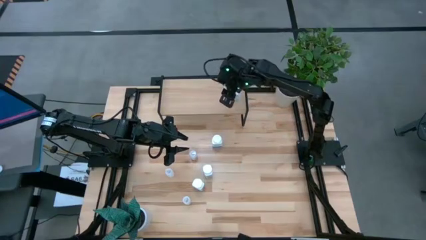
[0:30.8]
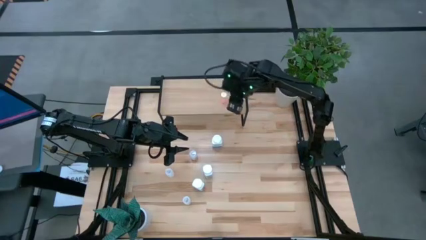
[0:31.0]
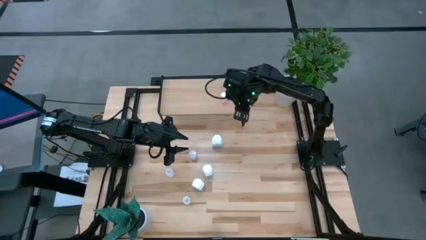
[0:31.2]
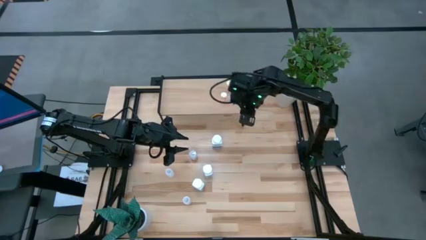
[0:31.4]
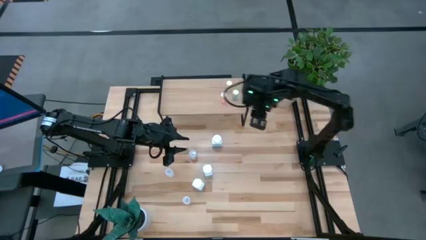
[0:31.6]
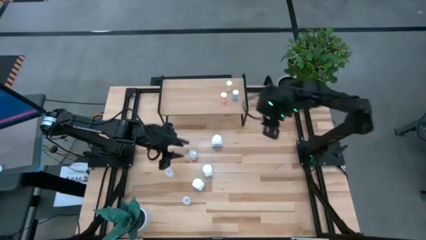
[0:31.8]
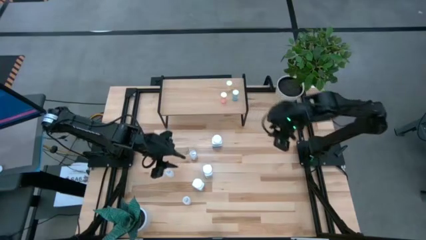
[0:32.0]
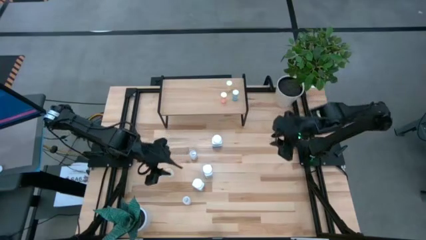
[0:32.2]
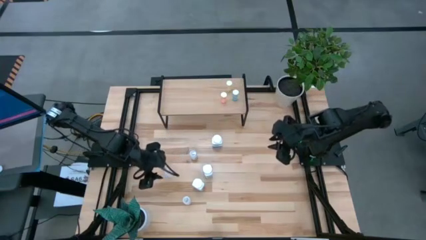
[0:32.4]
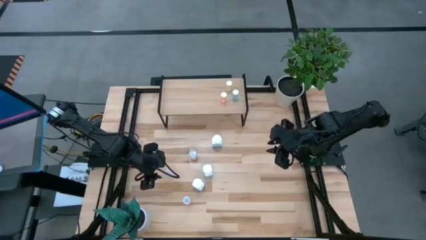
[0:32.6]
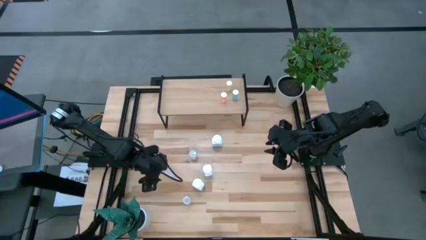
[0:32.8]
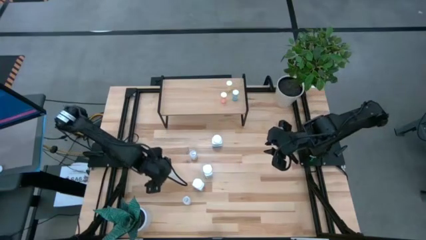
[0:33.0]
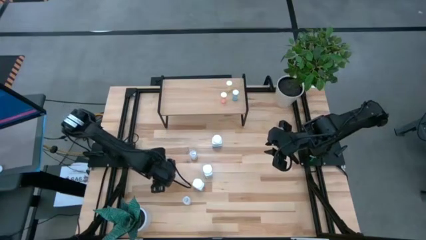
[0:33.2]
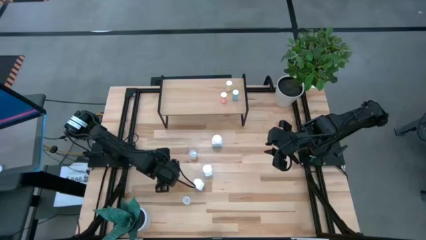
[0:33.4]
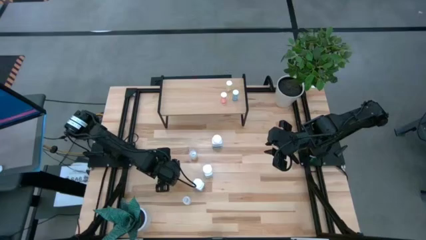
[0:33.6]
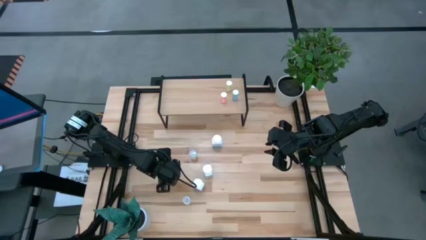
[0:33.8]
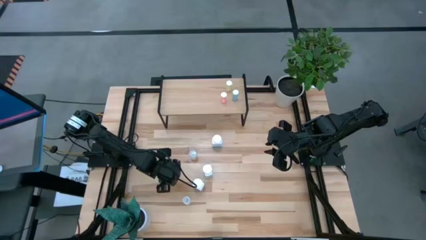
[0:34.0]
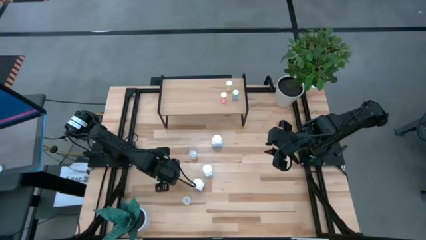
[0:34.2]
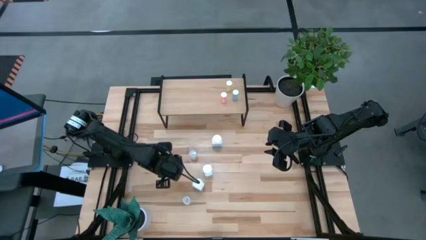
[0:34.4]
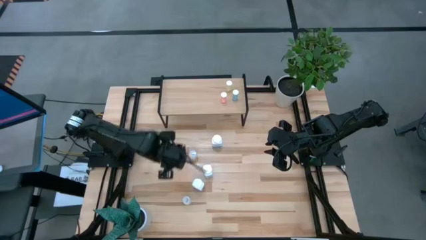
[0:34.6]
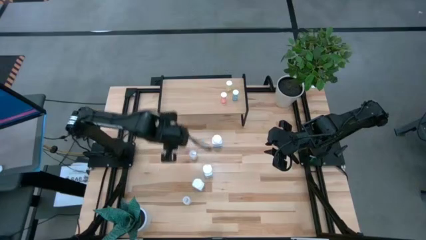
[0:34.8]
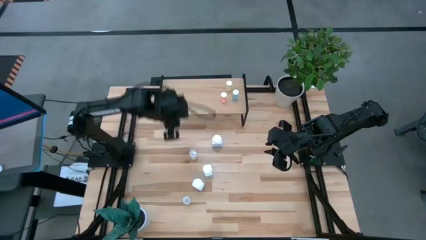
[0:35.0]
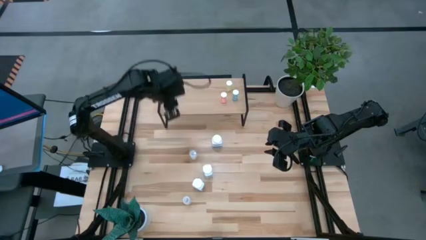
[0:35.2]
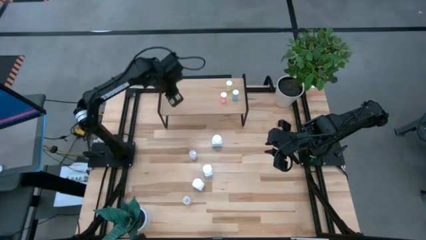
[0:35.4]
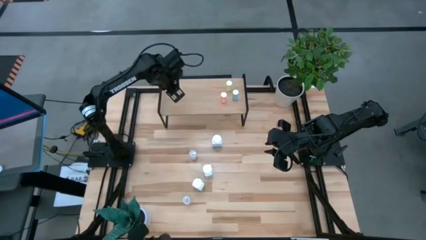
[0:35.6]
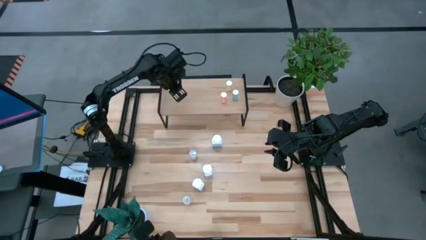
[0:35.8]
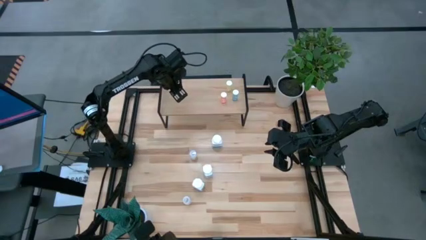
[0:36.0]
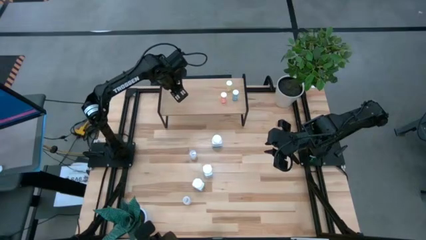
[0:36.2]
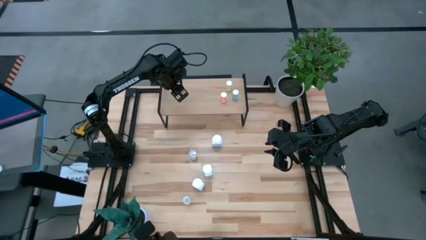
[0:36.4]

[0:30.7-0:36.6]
Task: Pick and place medicine bottles onto shelf by color
Put the middle transparent pill bottle on the shelf

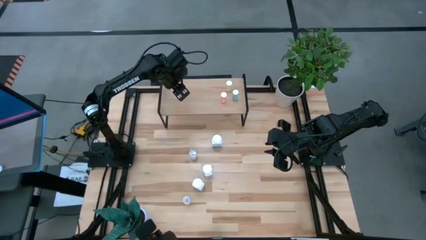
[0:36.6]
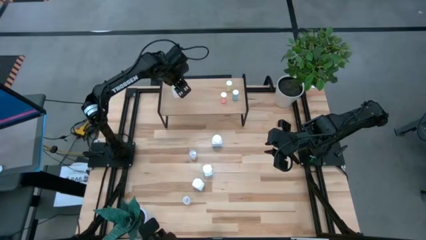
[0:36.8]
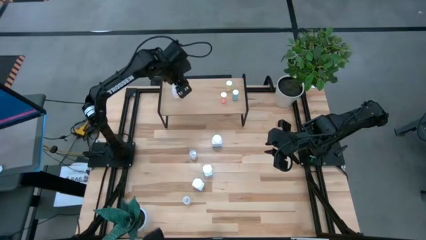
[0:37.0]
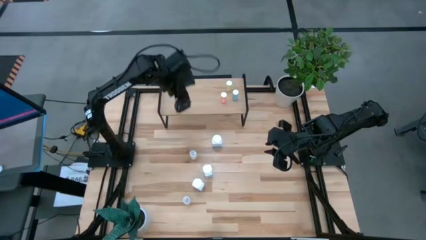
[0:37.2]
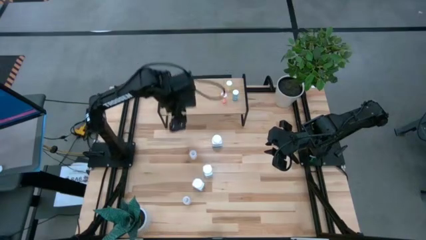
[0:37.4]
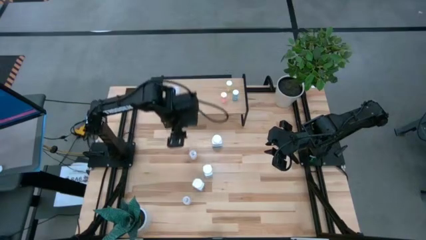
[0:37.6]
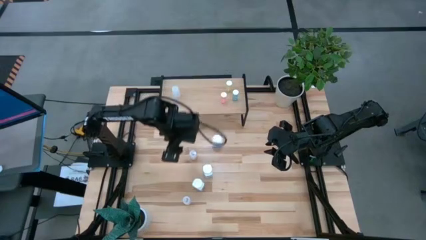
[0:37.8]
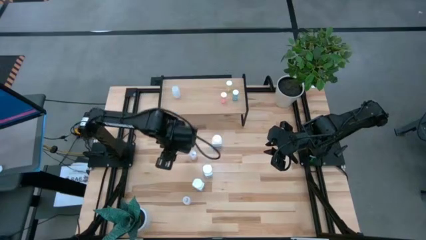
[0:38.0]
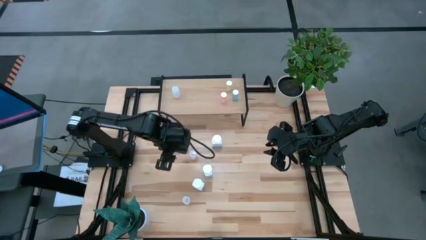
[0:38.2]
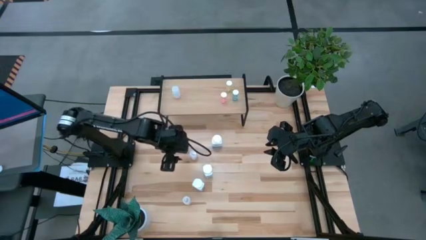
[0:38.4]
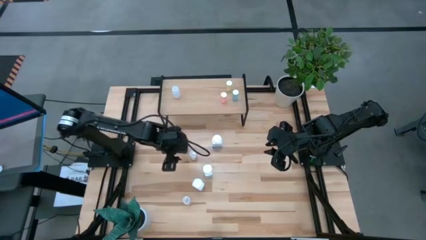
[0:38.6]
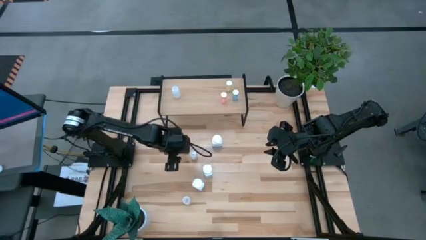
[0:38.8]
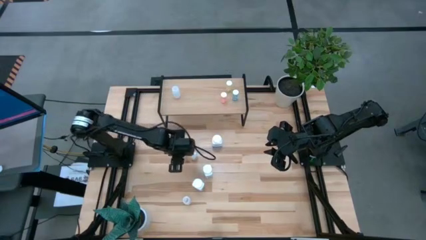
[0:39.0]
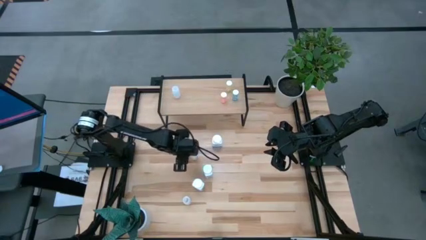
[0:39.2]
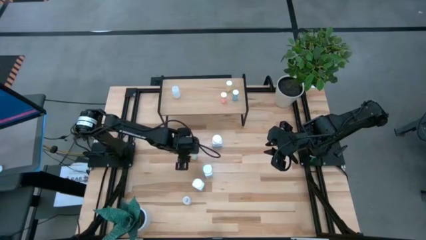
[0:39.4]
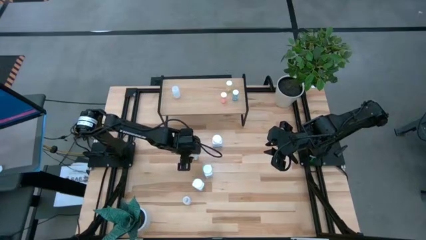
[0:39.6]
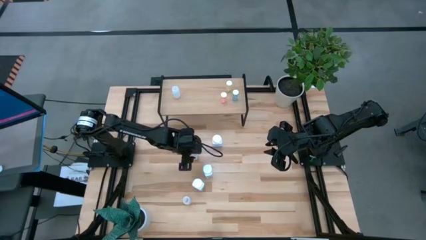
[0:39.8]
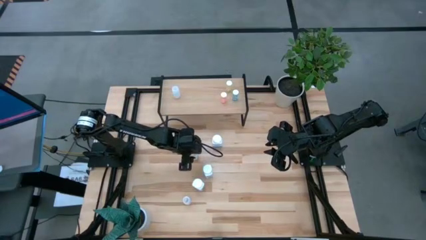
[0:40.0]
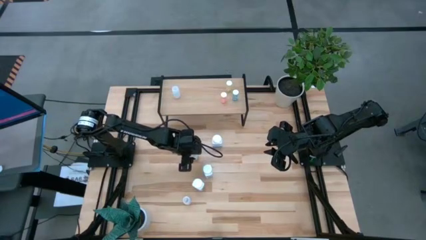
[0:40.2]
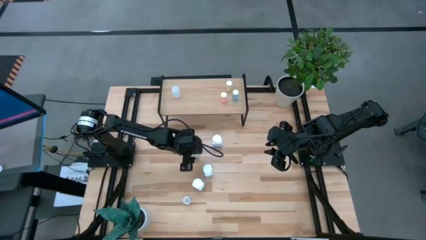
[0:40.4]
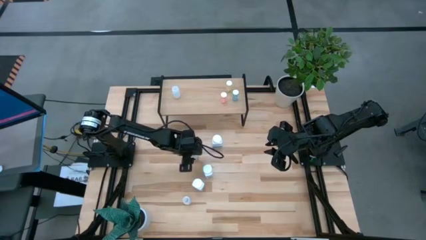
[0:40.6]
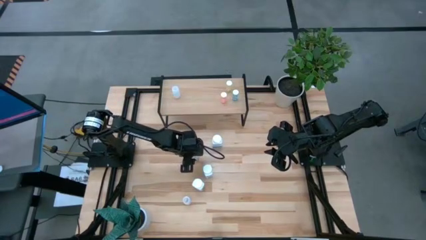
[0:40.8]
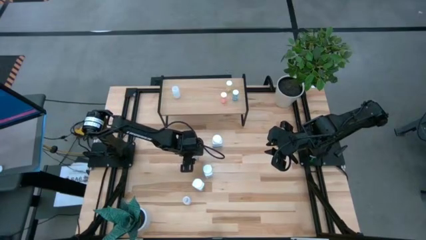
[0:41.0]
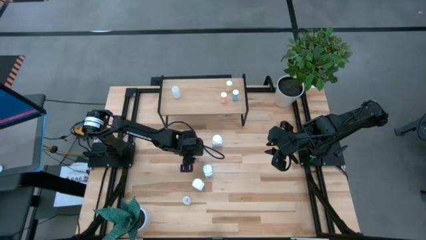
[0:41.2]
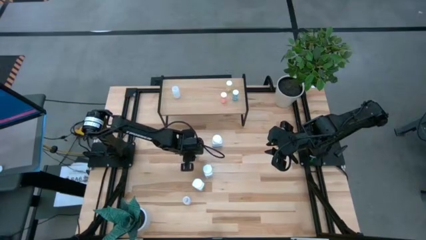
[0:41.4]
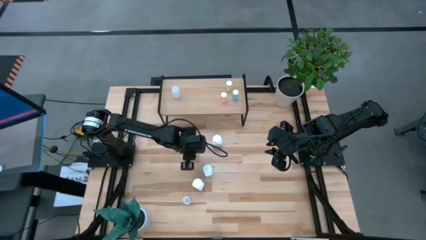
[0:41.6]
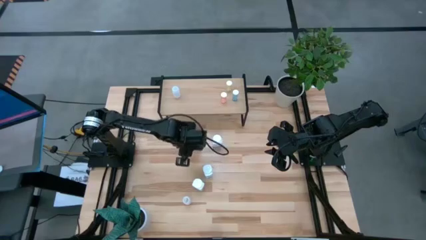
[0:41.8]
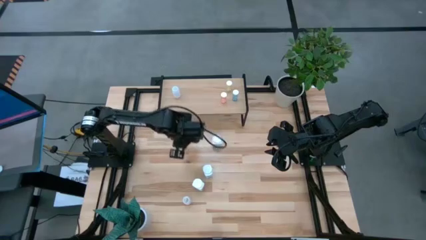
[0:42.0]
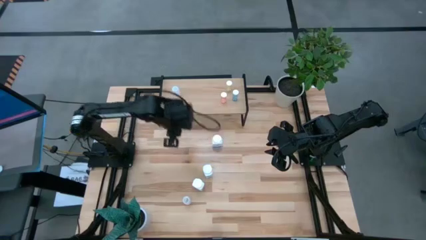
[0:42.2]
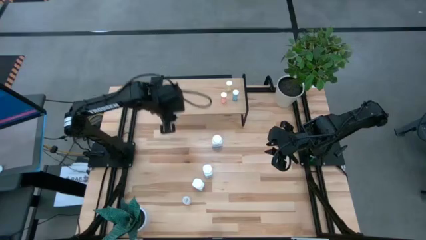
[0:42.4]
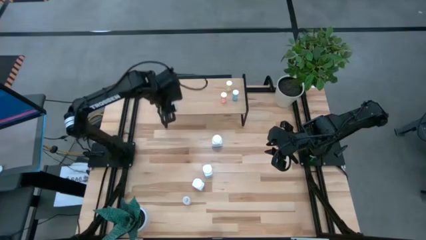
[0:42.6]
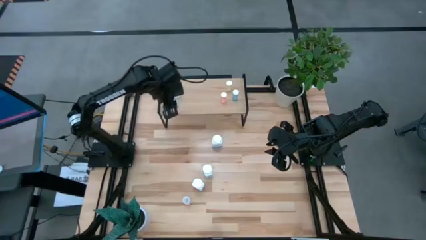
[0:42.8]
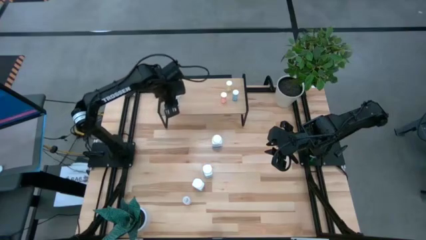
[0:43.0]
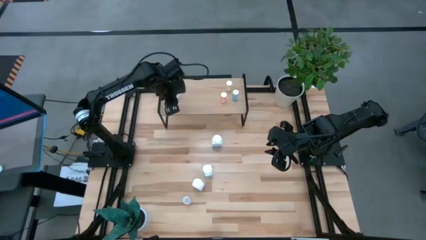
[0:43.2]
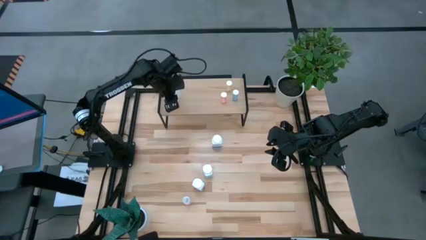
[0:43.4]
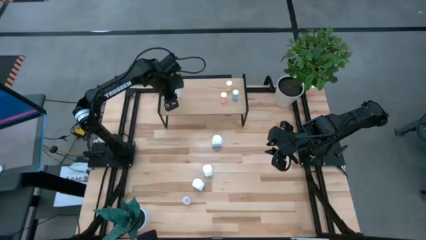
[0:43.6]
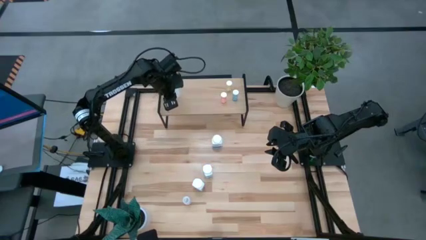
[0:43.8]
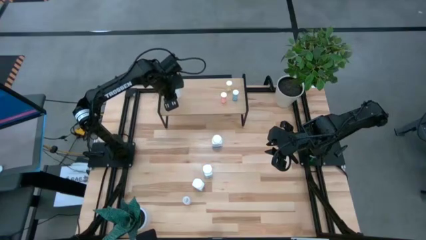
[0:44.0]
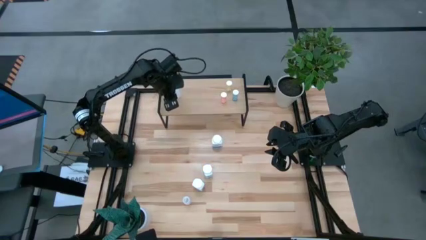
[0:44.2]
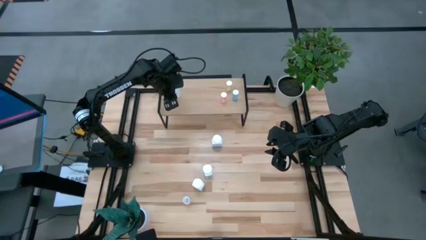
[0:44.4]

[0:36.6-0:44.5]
Put the top transparent pill bottle on the shelf
